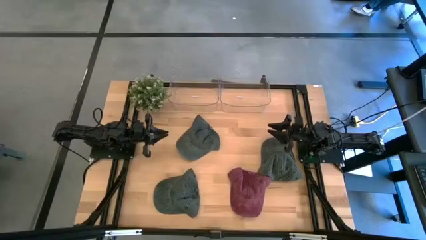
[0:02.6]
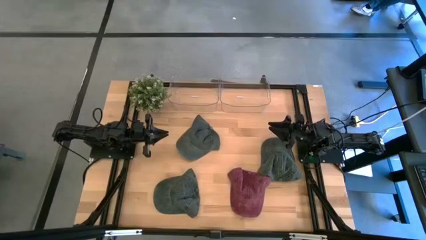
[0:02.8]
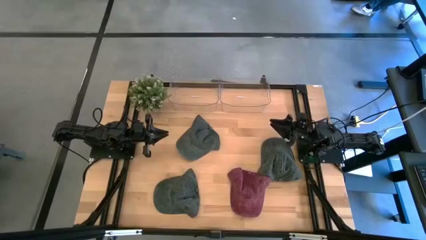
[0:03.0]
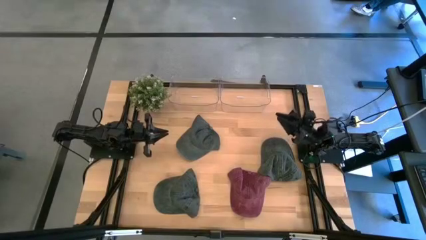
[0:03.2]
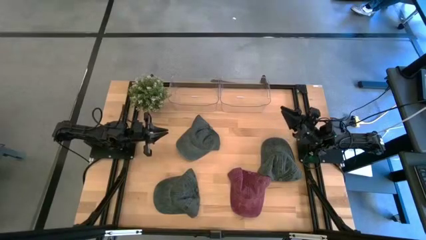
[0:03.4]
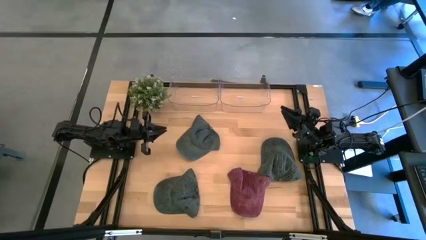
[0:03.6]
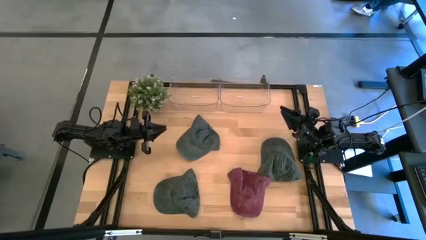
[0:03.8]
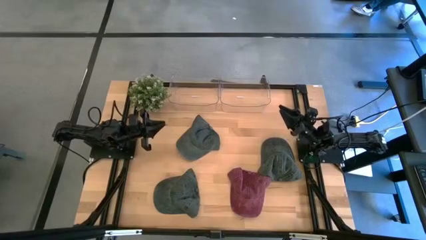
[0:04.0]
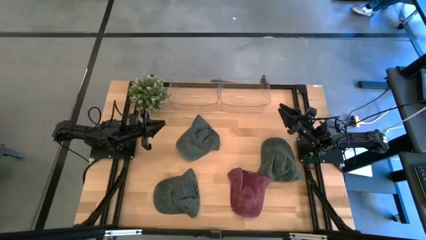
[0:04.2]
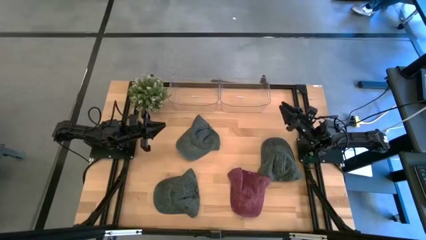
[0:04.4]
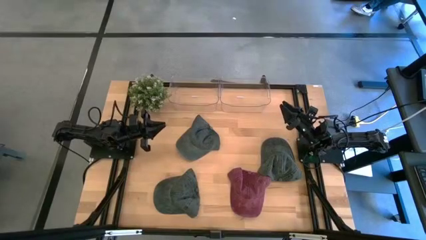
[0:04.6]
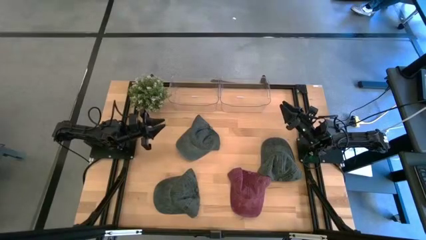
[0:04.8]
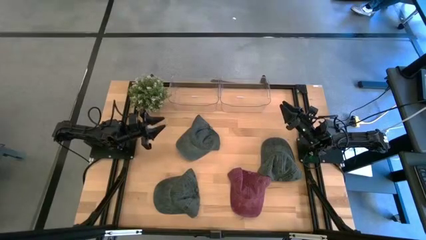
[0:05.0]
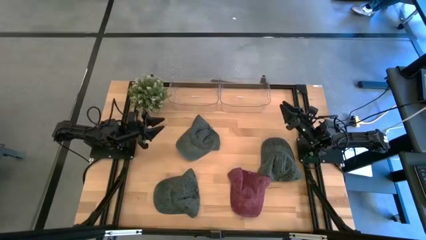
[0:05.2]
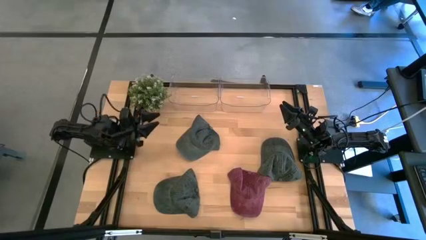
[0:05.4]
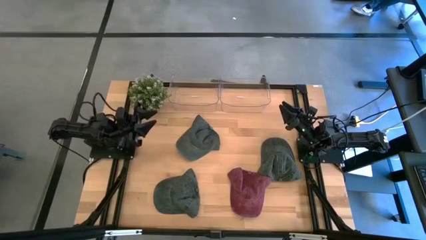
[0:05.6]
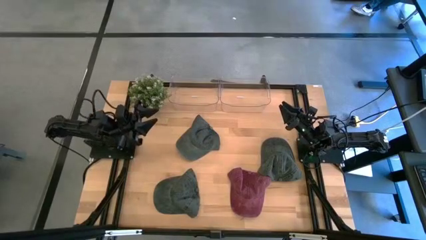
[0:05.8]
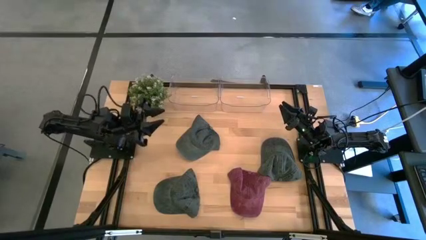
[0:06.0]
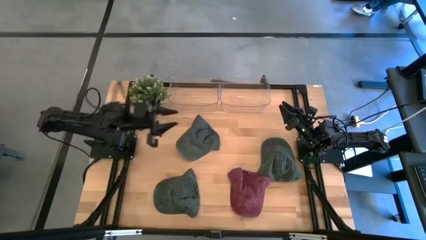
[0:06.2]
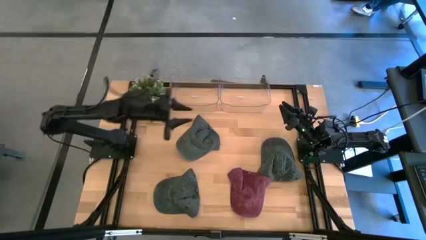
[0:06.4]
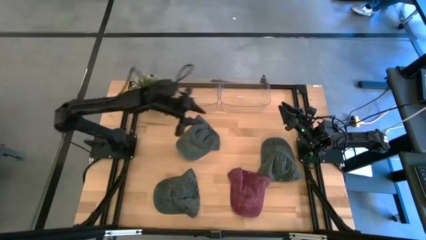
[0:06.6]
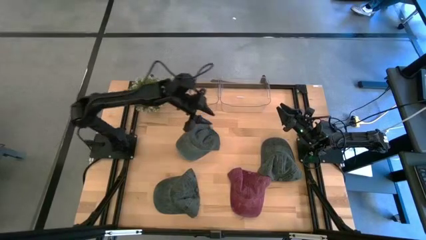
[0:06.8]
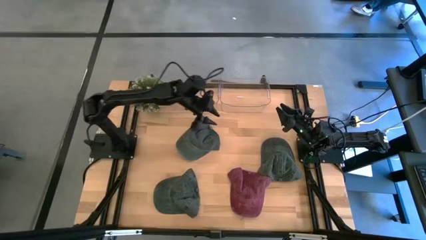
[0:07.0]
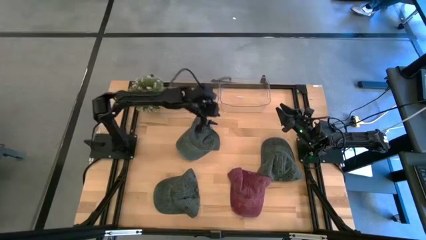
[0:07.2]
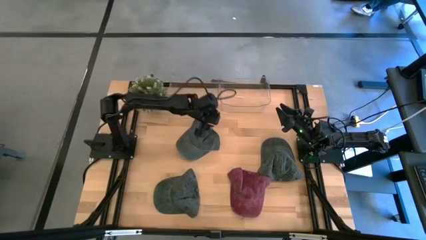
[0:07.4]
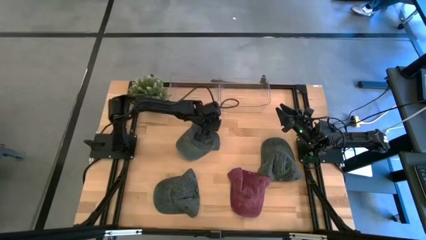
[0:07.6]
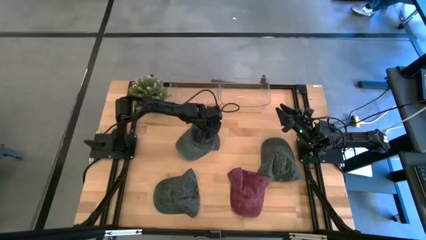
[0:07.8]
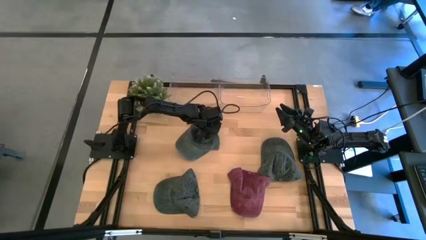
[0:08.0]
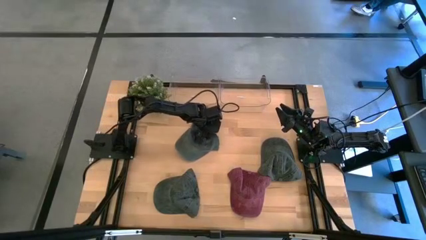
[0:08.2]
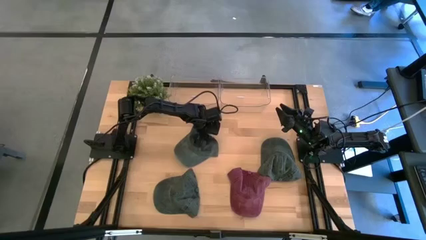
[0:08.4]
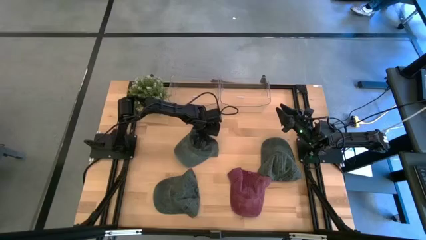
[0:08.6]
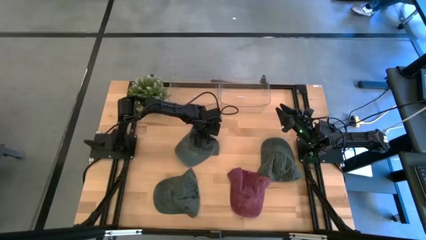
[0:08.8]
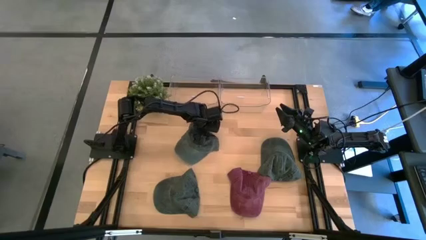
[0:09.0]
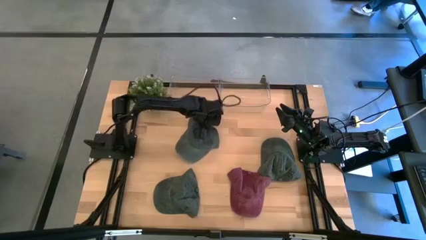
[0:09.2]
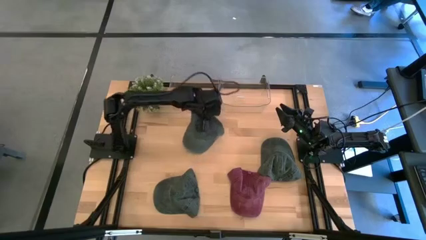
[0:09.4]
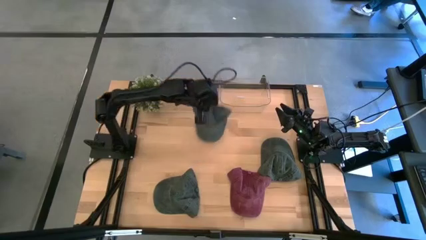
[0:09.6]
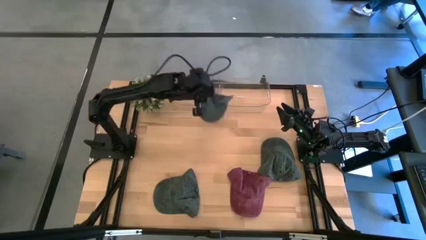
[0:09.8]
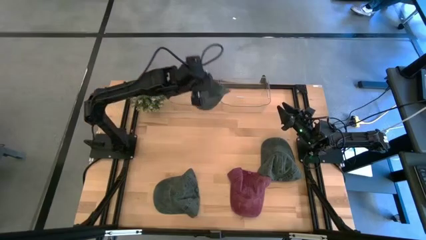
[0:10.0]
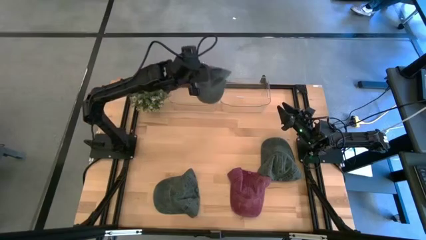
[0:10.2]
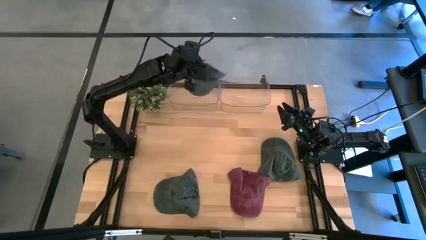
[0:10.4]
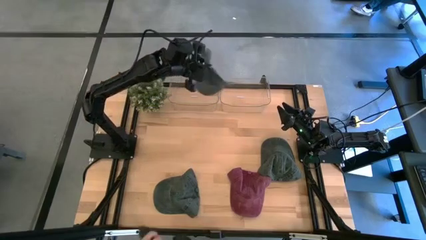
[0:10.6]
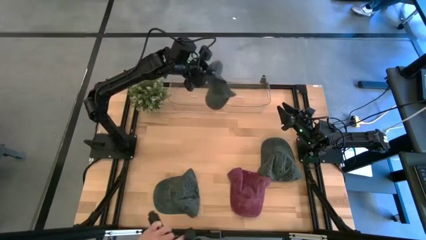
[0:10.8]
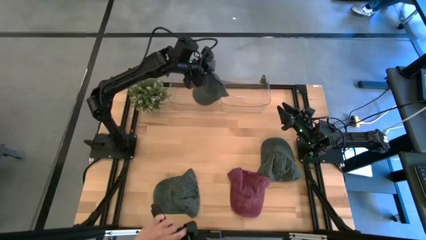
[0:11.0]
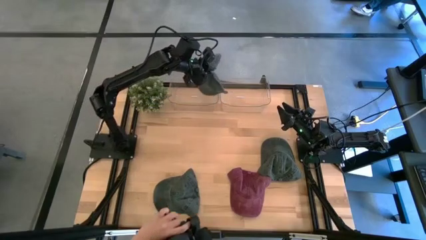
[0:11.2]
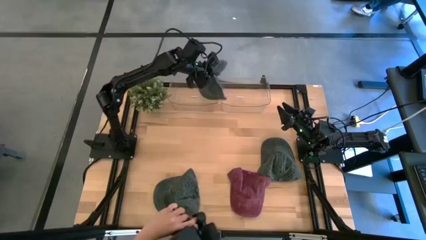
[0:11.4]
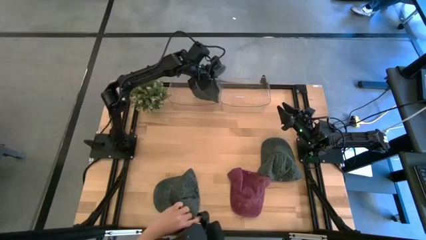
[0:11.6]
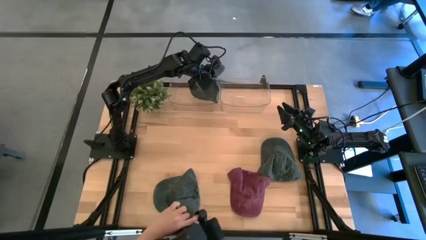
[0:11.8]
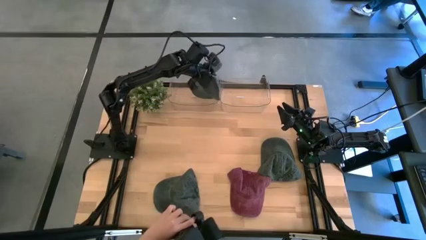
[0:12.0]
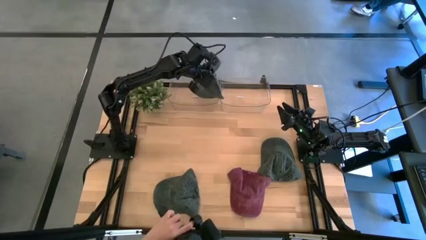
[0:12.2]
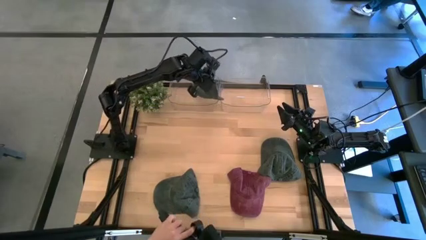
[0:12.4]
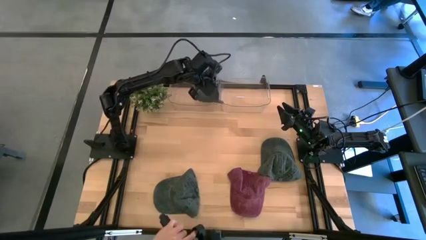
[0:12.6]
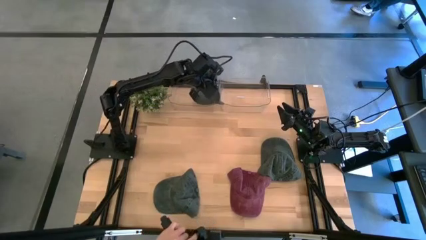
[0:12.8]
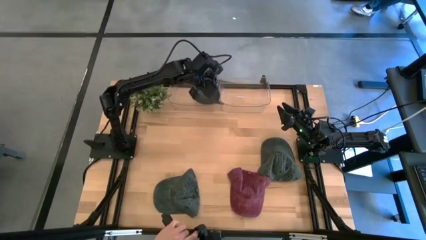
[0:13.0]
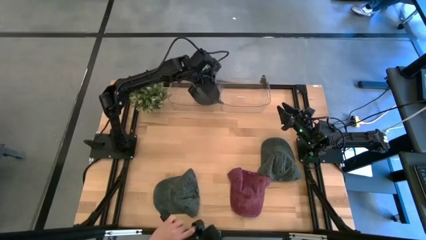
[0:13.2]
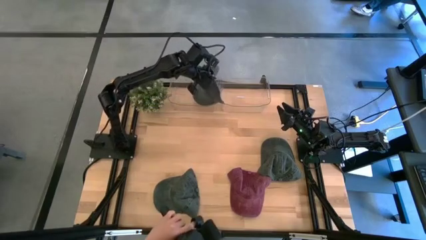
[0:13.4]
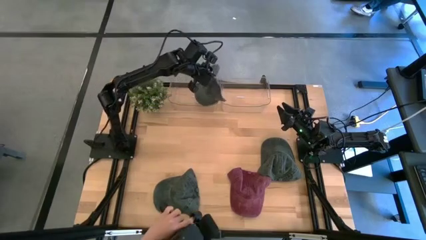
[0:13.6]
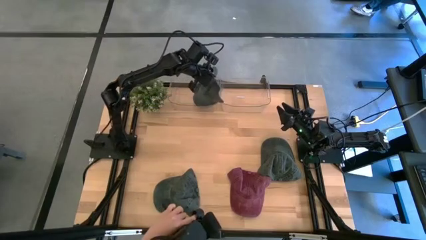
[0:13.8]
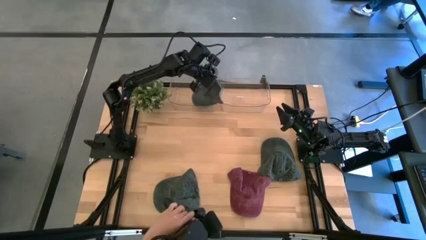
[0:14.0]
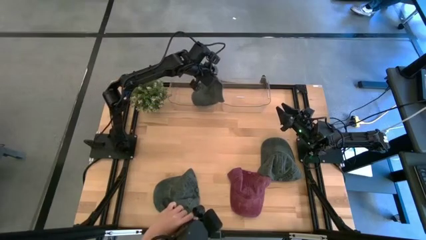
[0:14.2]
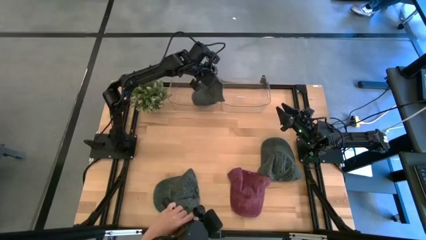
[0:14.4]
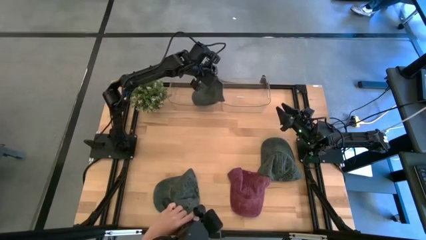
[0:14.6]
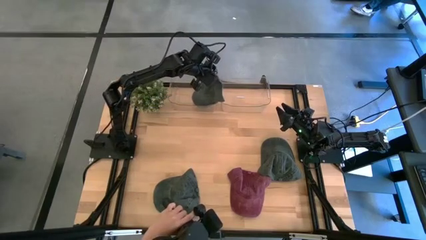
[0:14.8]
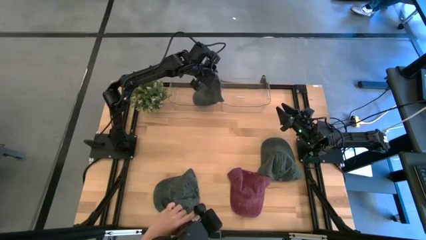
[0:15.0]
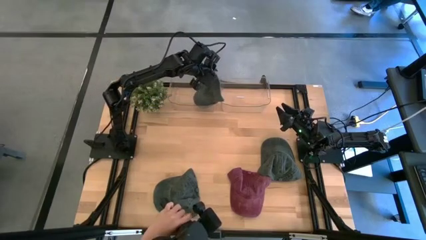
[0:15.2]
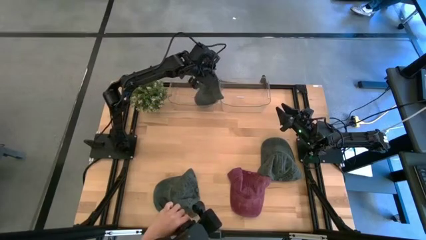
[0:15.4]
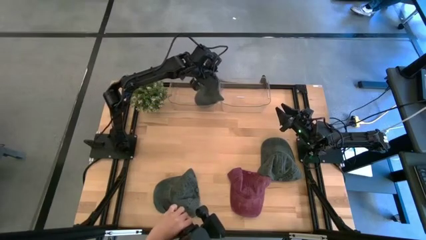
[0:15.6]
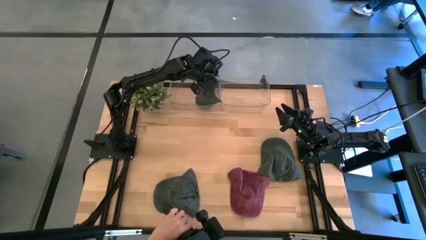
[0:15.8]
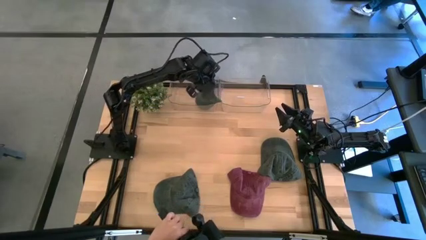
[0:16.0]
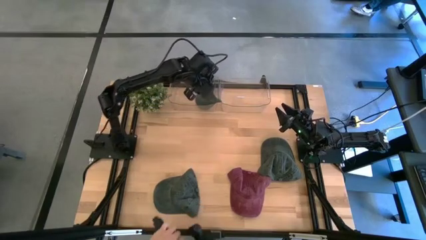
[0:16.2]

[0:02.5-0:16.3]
Task: Pick & Place hat
Put the top left black cap into the left transparent bin
